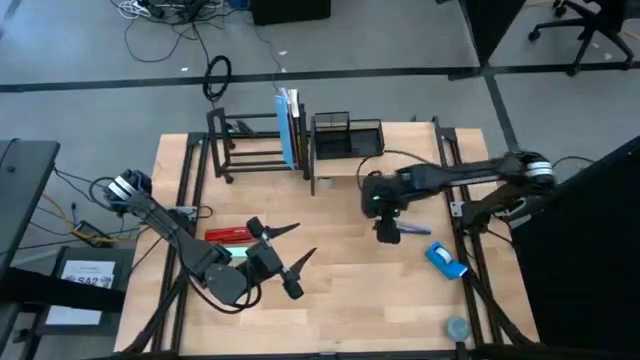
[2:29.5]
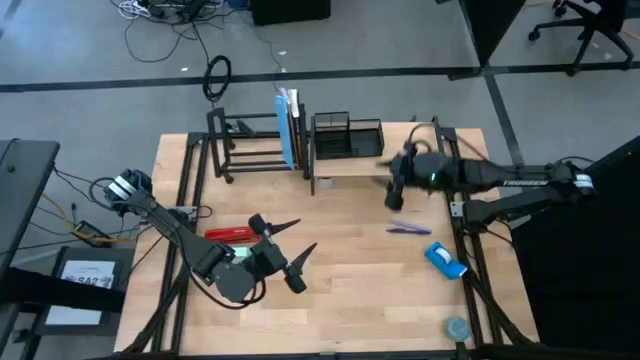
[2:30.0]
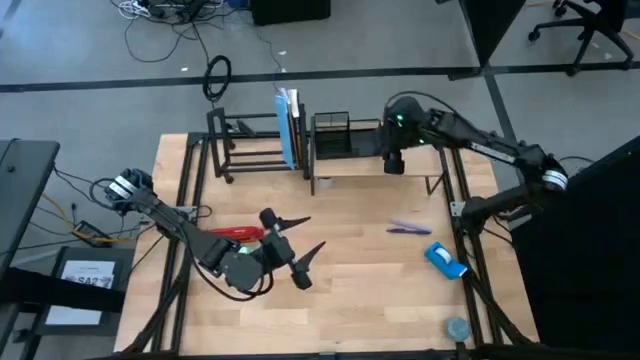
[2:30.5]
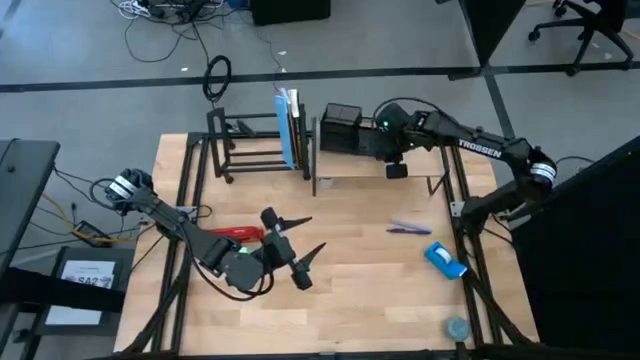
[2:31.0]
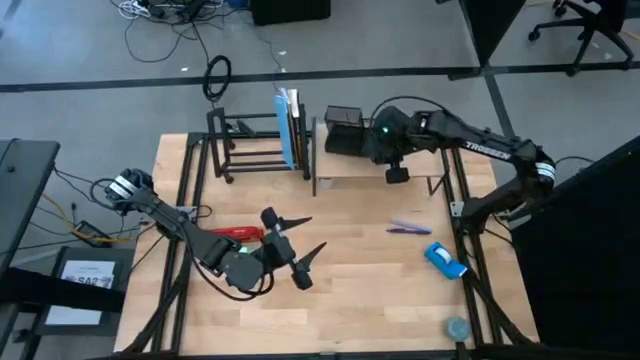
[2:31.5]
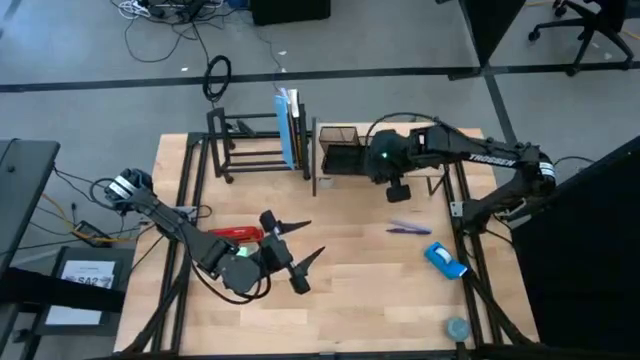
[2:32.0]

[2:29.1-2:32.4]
Task: Stock shelves
Remove the black desk organizer from the shelf

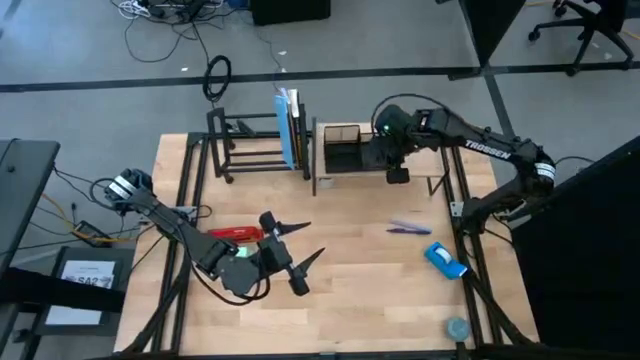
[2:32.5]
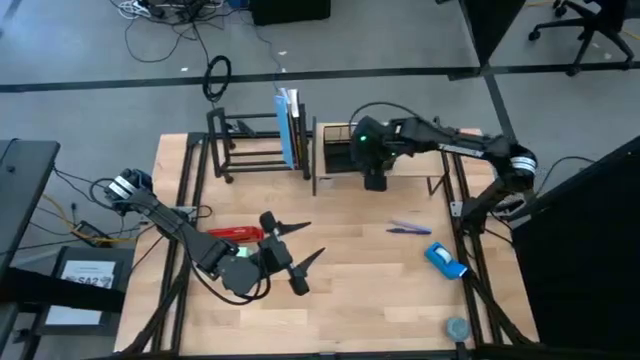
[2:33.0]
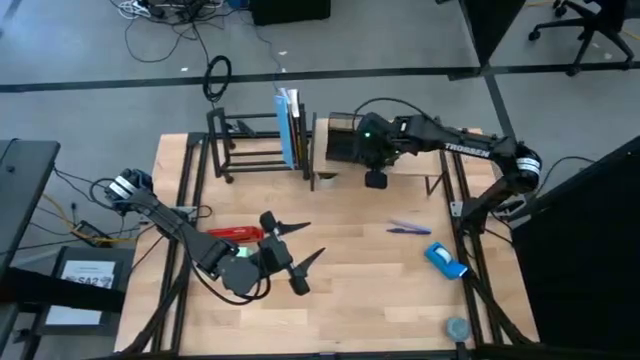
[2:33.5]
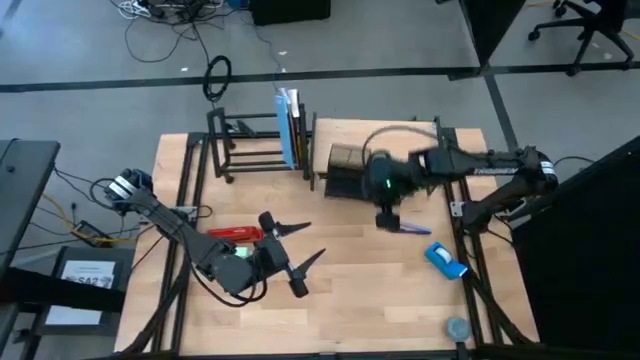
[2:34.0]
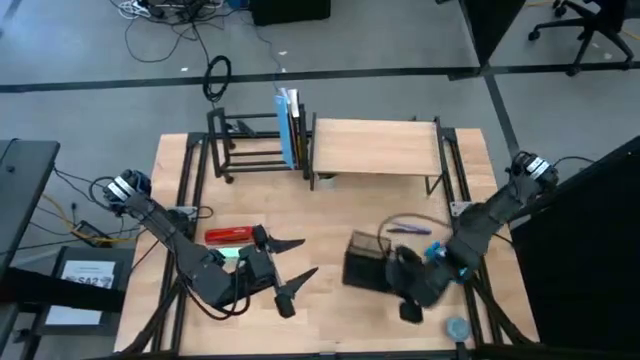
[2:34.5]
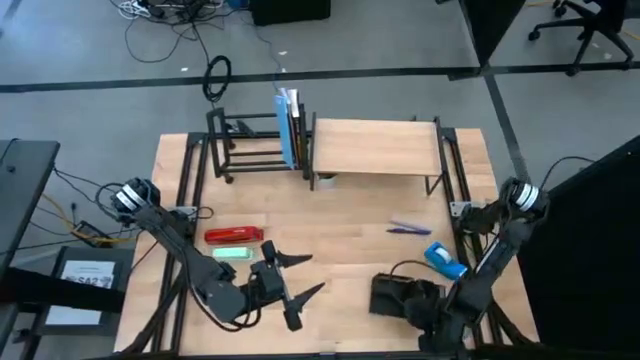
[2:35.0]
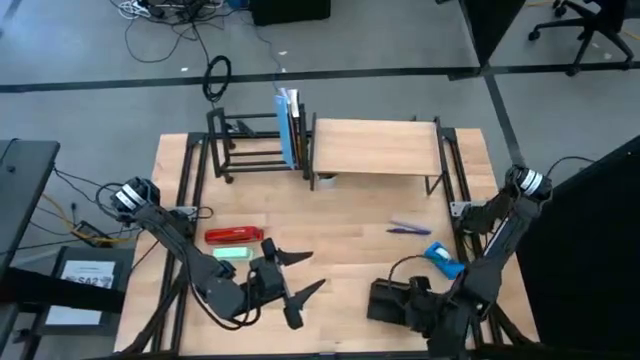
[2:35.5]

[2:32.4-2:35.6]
Remove the black desk organizer from the shelf

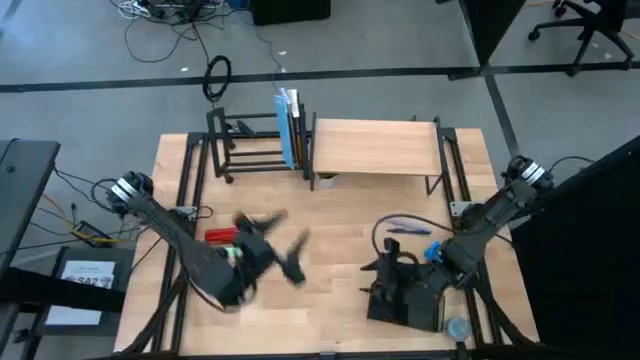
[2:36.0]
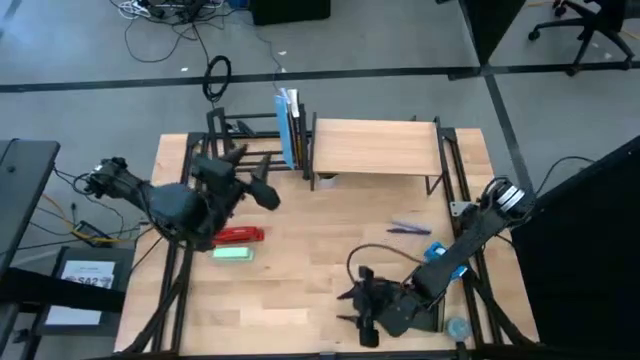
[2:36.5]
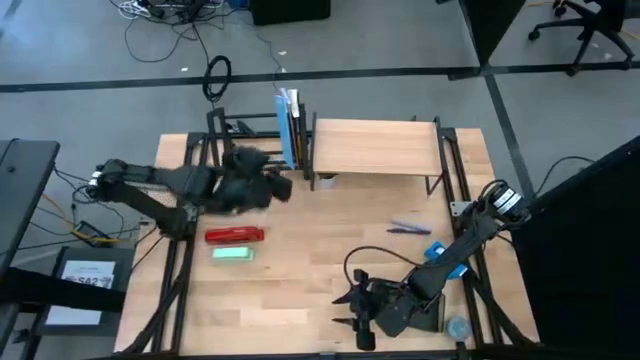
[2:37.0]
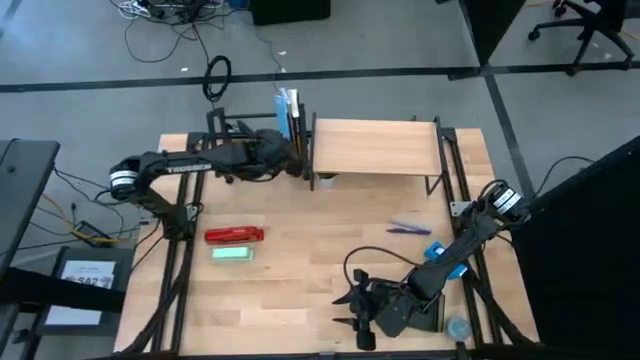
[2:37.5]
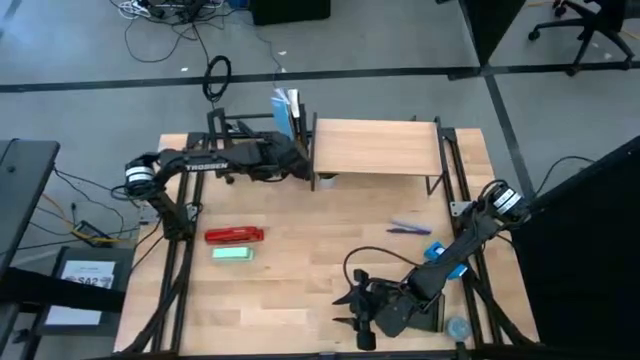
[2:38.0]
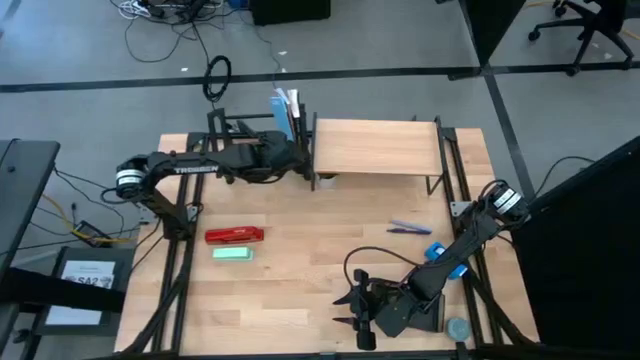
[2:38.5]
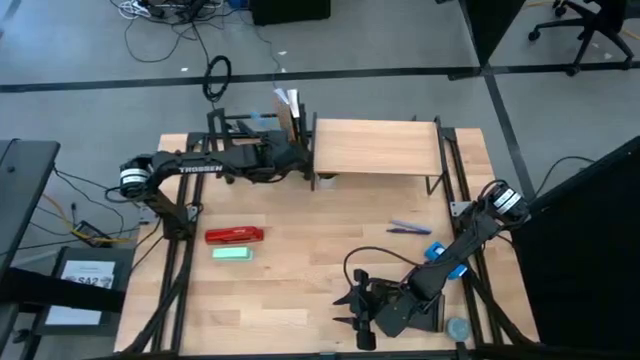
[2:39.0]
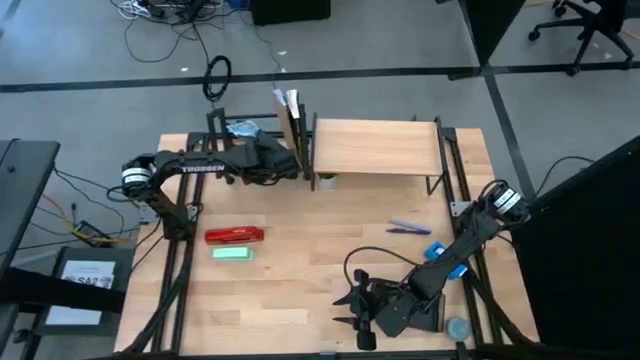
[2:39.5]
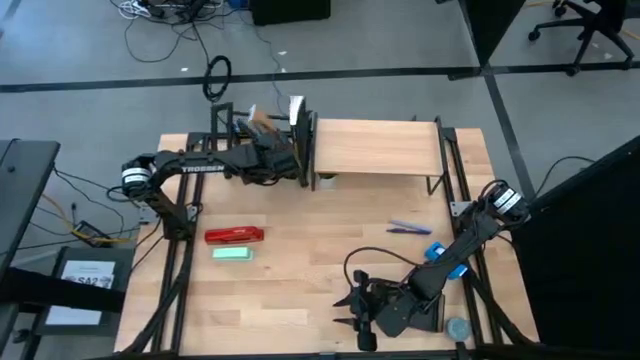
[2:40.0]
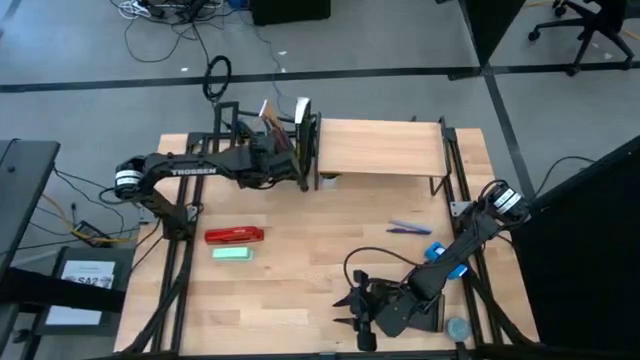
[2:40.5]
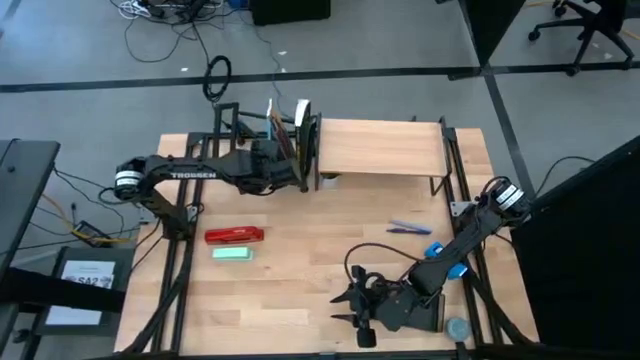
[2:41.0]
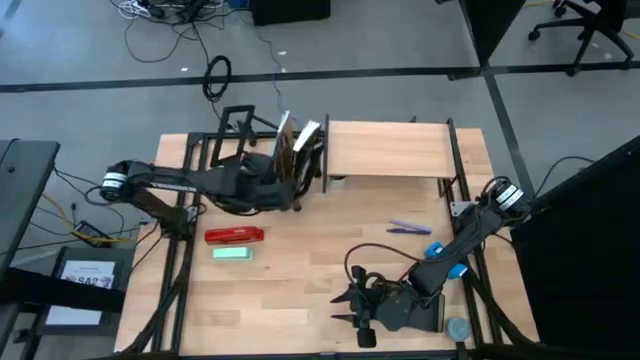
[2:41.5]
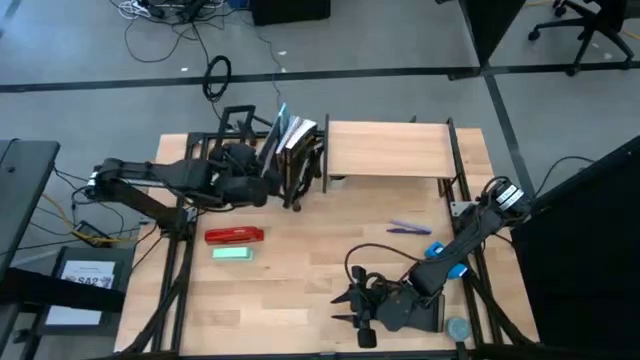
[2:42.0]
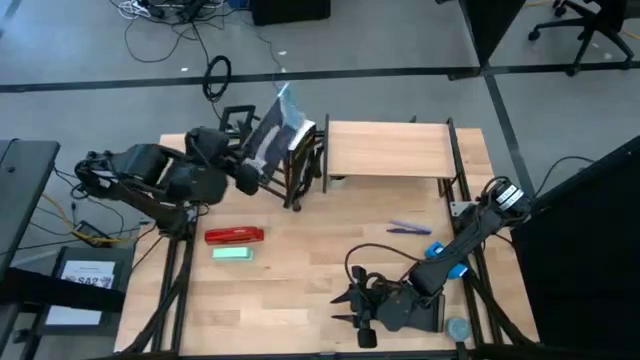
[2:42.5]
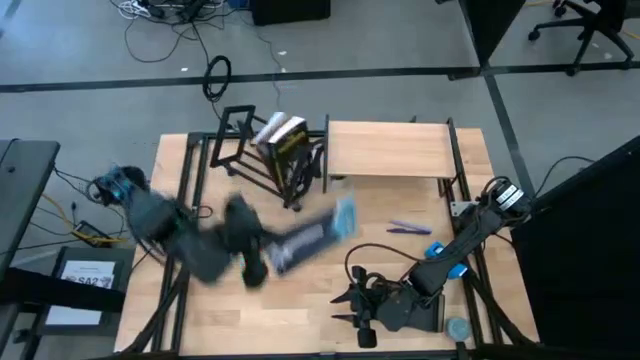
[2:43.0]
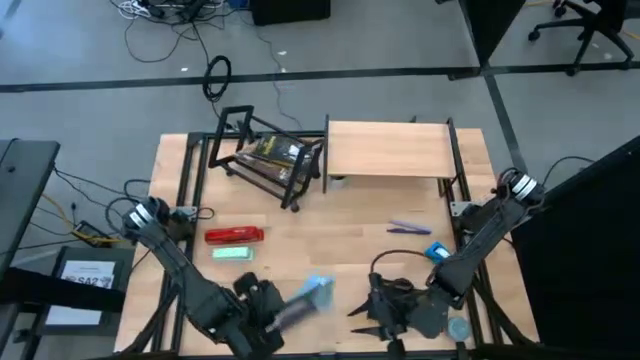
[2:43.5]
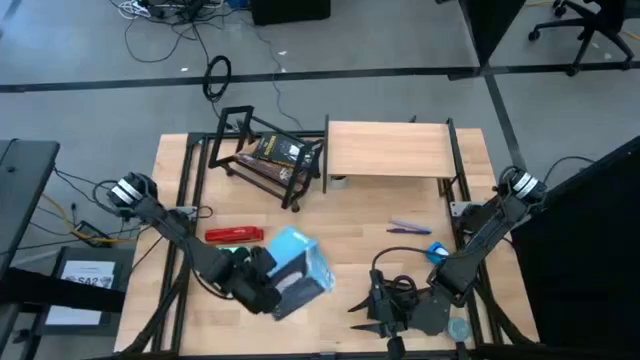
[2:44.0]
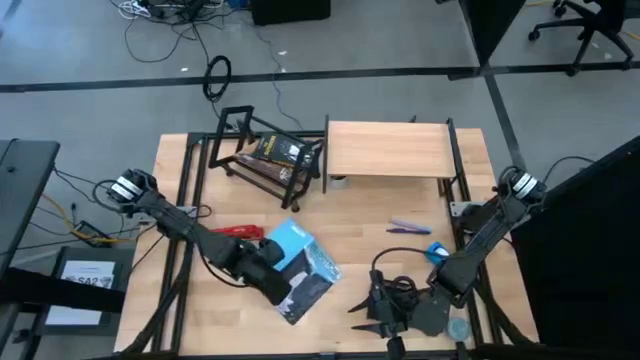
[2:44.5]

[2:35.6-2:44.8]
Remove the blue book from the black bookshelf

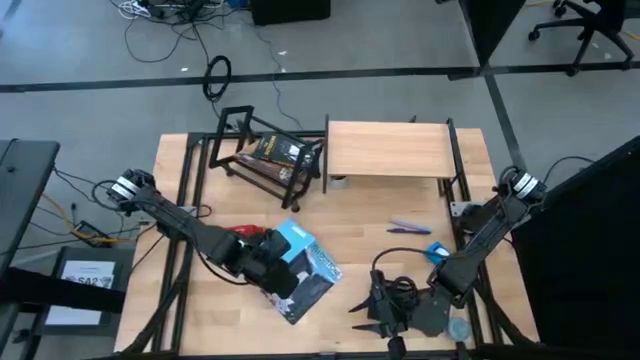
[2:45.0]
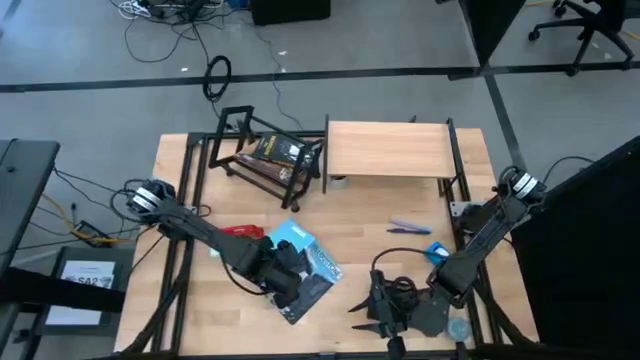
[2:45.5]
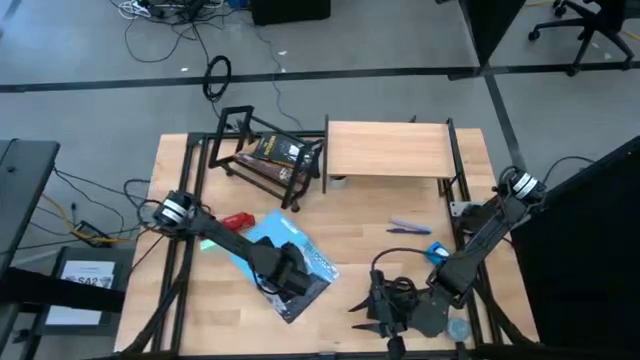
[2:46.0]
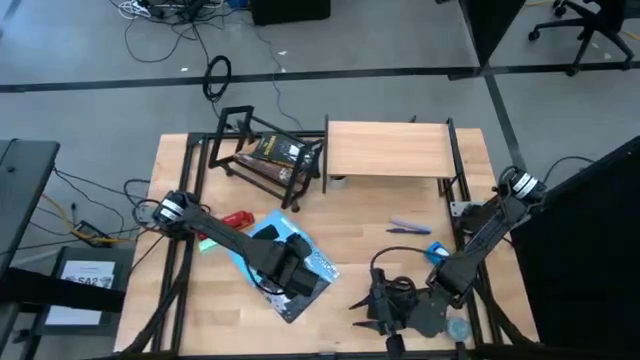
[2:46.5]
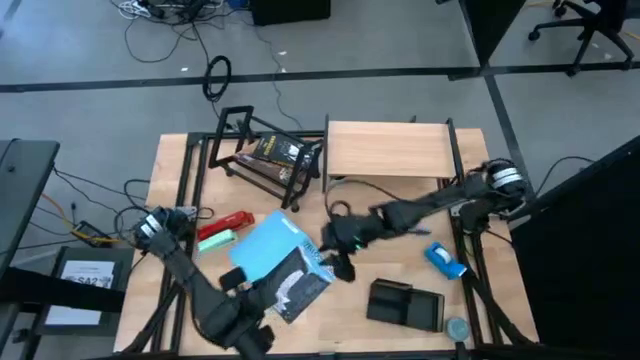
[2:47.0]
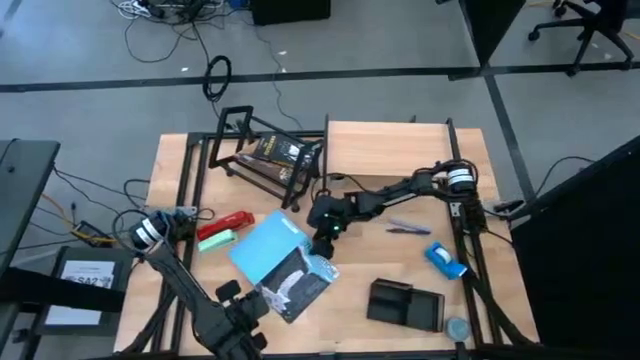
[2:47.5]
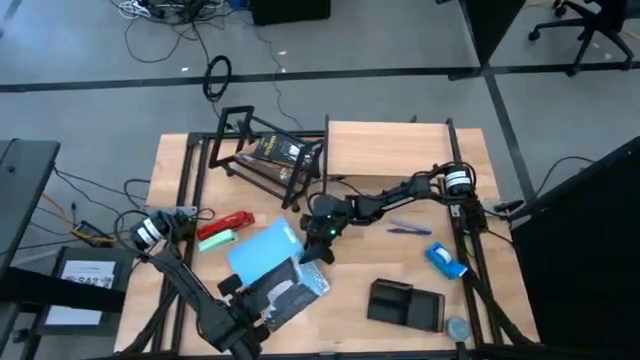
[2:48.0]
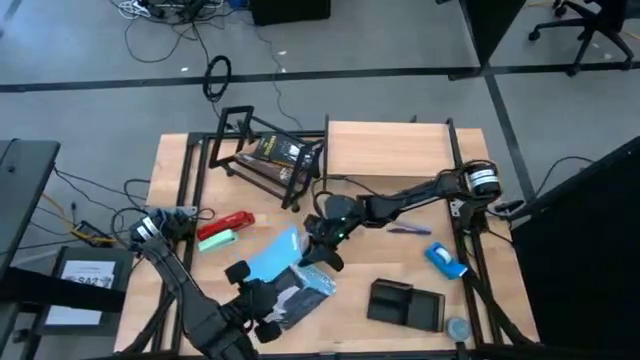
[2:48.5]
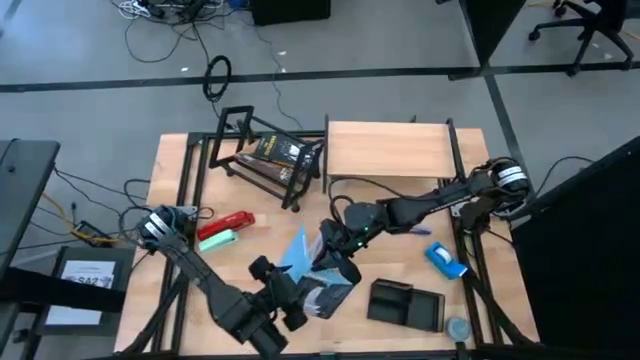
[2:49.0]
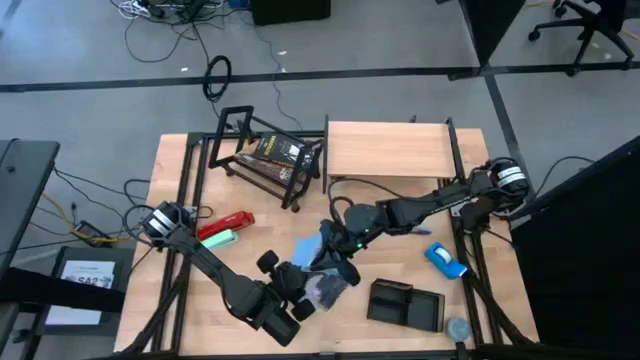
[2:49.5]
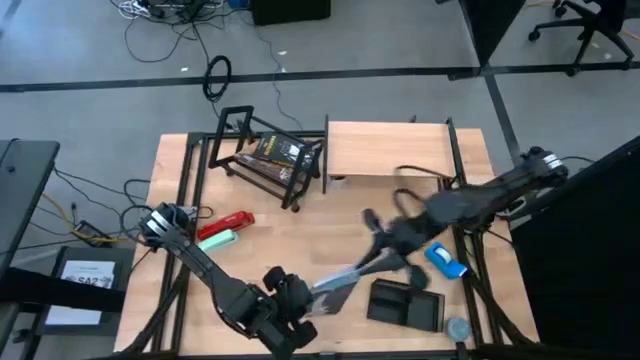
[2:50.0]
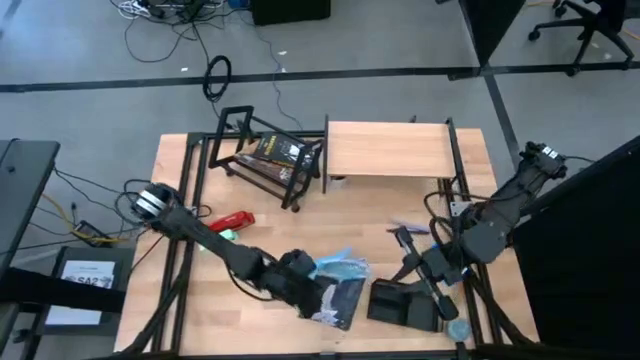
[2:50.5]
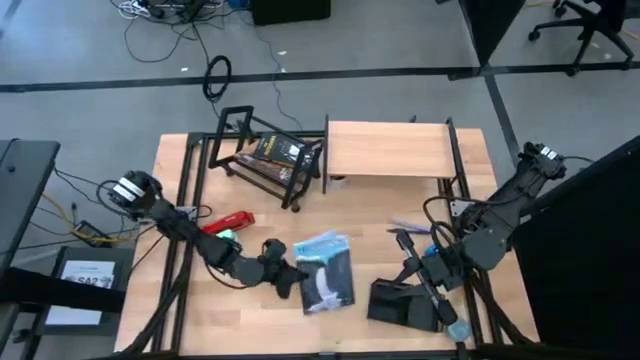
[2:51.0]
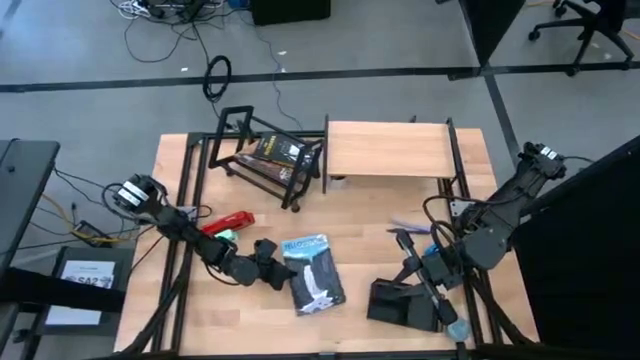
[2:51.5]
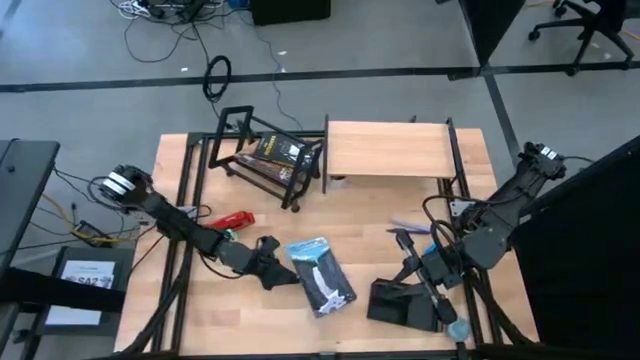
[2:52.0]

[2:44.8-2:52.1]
Adjust the blue book on the table
